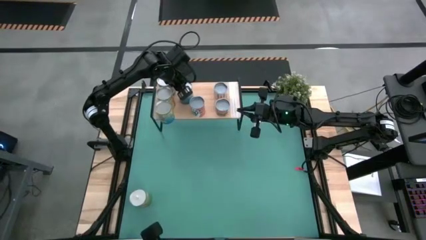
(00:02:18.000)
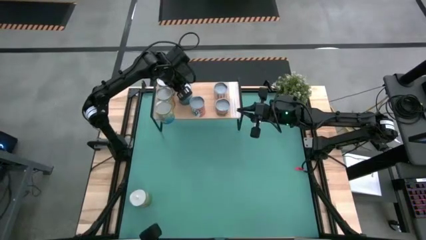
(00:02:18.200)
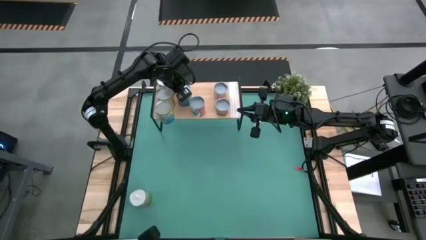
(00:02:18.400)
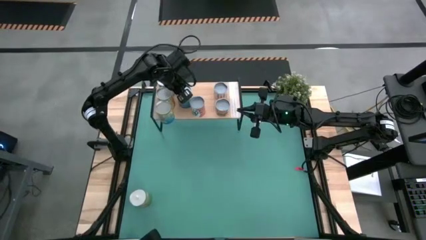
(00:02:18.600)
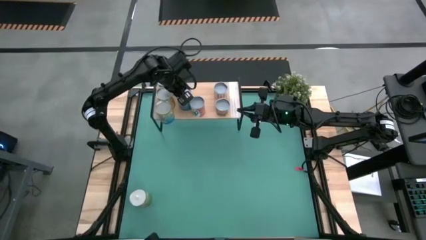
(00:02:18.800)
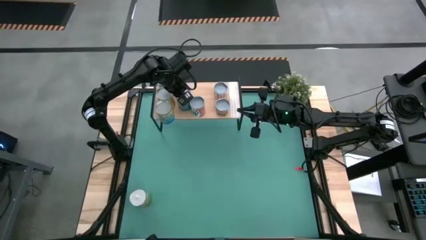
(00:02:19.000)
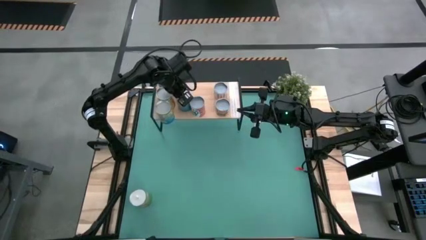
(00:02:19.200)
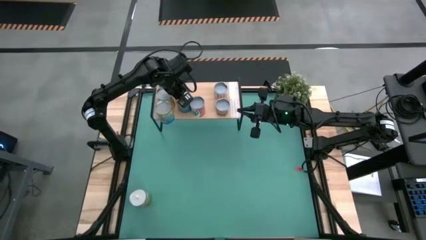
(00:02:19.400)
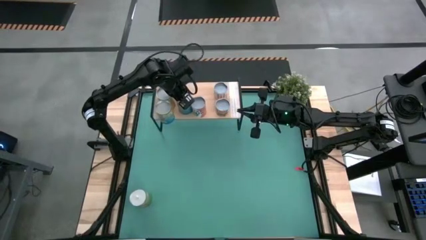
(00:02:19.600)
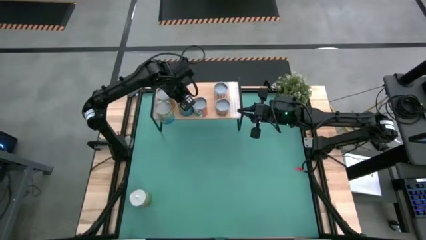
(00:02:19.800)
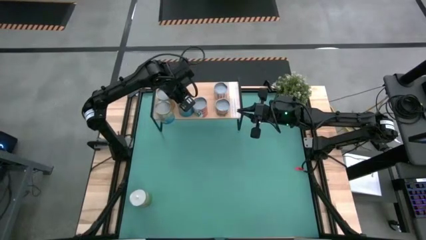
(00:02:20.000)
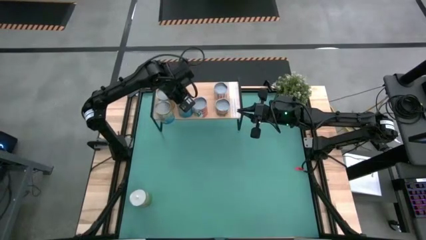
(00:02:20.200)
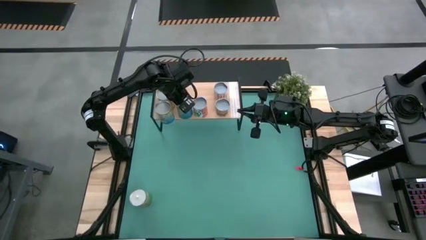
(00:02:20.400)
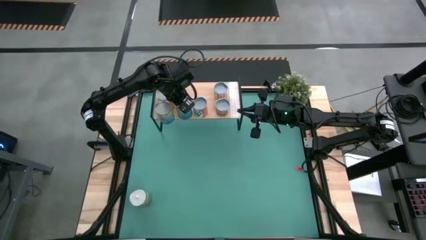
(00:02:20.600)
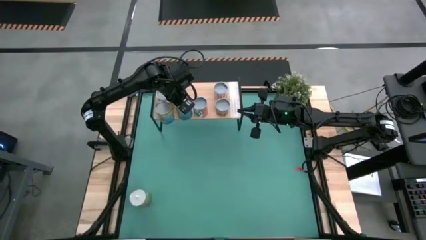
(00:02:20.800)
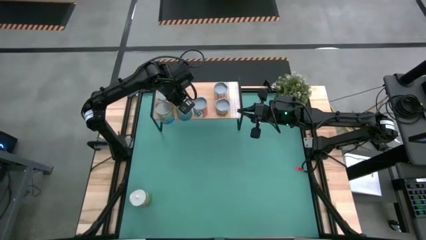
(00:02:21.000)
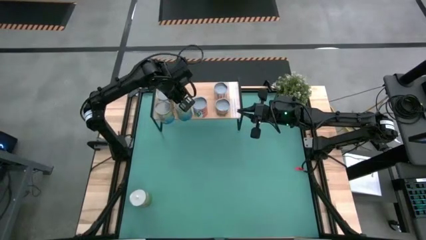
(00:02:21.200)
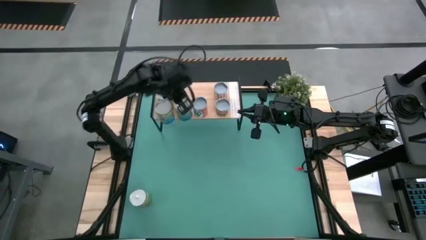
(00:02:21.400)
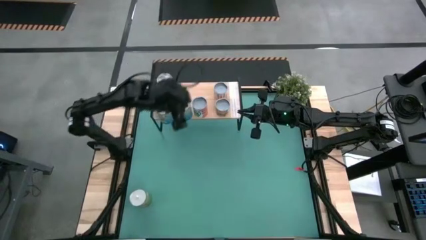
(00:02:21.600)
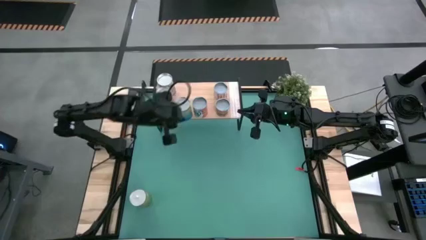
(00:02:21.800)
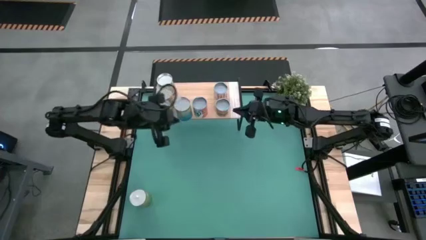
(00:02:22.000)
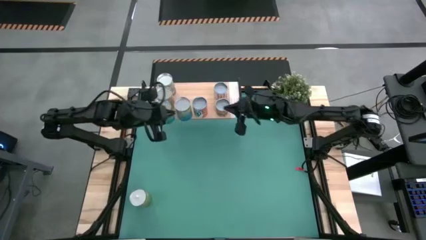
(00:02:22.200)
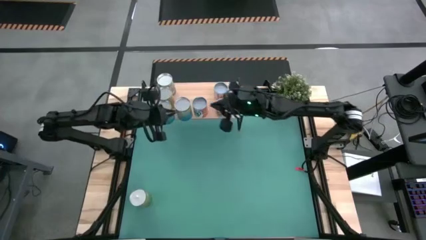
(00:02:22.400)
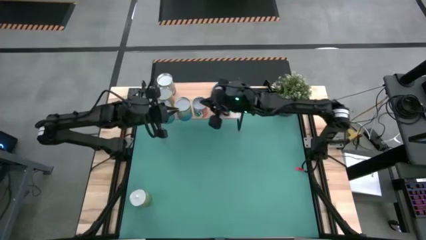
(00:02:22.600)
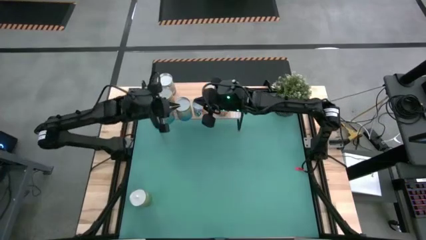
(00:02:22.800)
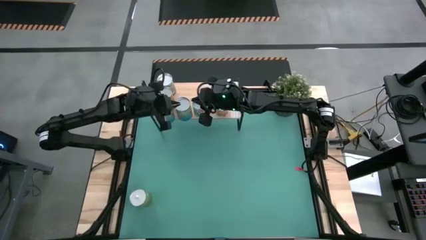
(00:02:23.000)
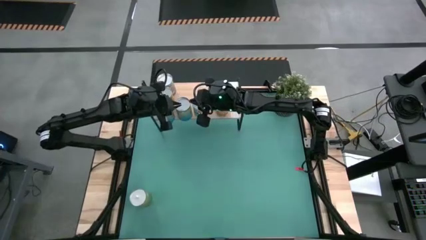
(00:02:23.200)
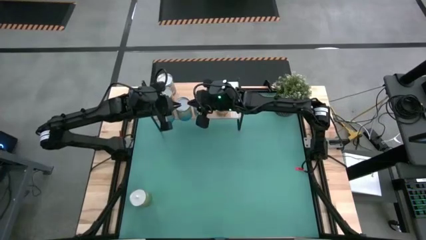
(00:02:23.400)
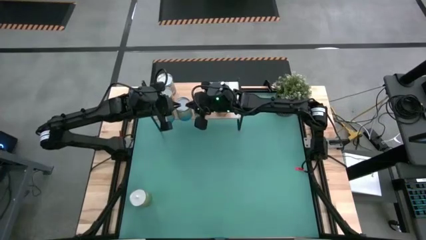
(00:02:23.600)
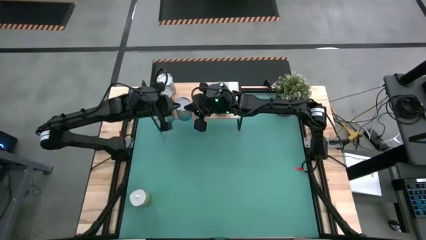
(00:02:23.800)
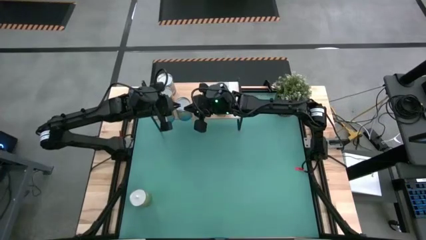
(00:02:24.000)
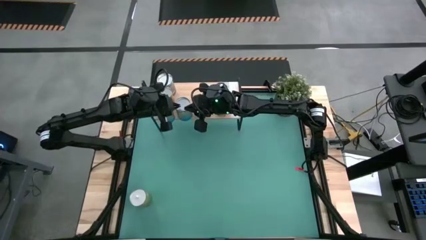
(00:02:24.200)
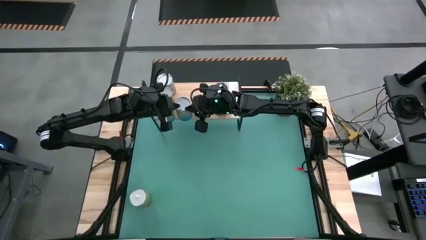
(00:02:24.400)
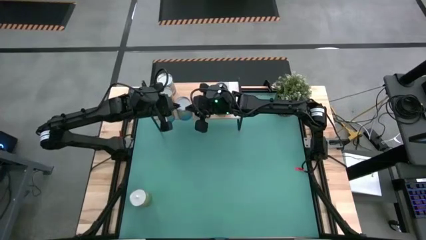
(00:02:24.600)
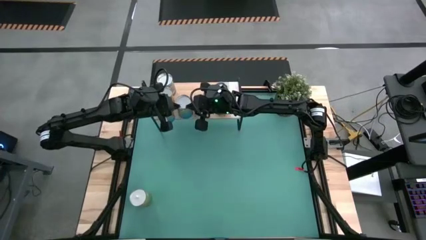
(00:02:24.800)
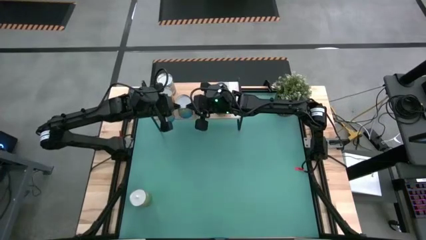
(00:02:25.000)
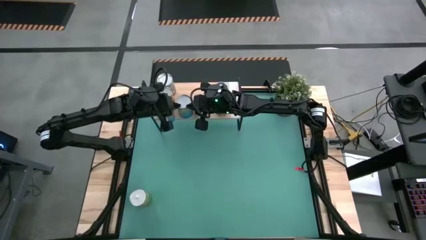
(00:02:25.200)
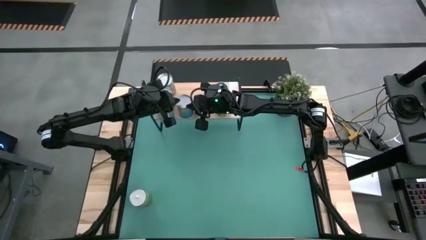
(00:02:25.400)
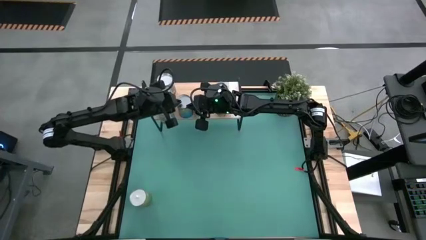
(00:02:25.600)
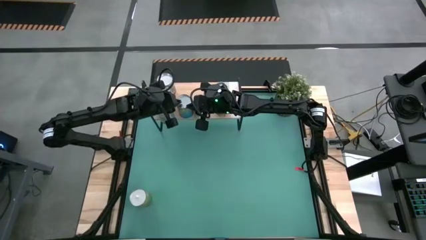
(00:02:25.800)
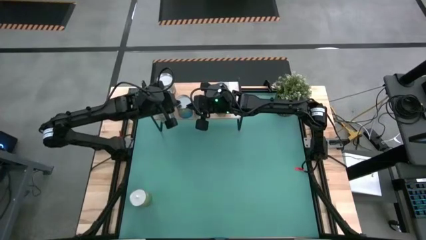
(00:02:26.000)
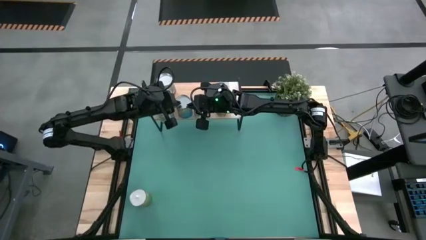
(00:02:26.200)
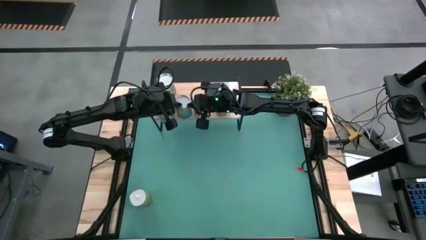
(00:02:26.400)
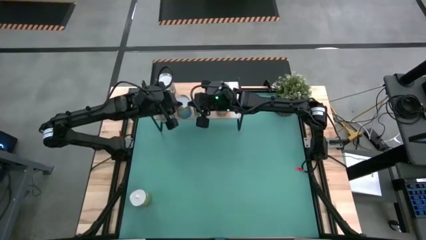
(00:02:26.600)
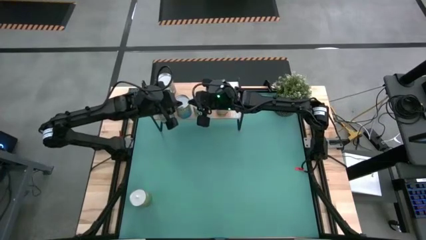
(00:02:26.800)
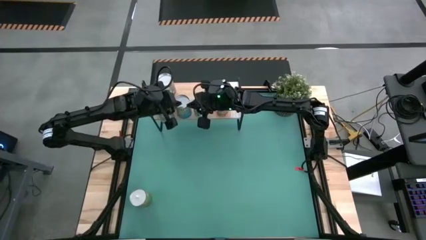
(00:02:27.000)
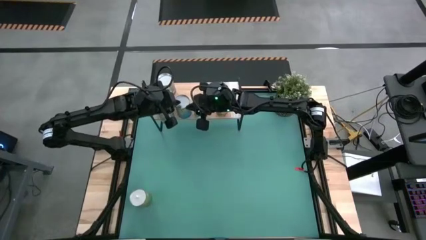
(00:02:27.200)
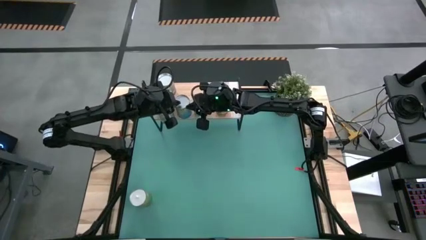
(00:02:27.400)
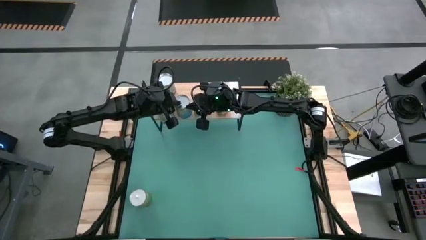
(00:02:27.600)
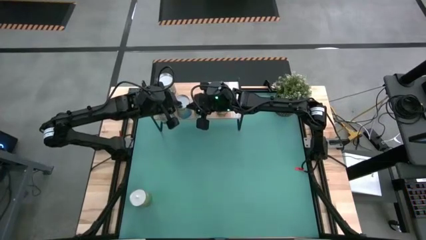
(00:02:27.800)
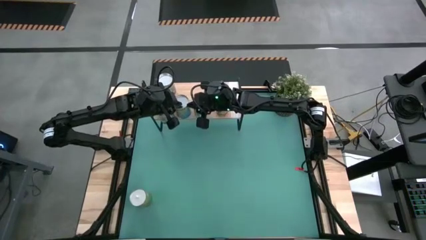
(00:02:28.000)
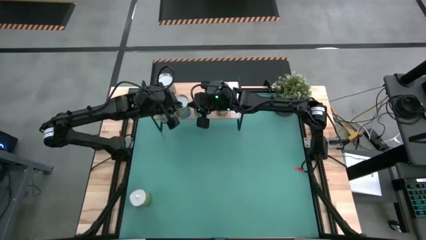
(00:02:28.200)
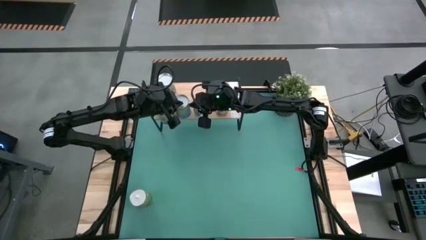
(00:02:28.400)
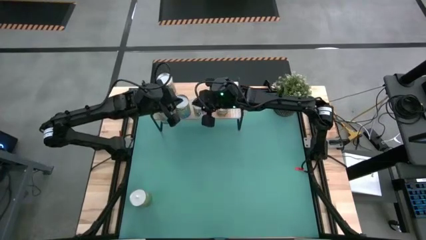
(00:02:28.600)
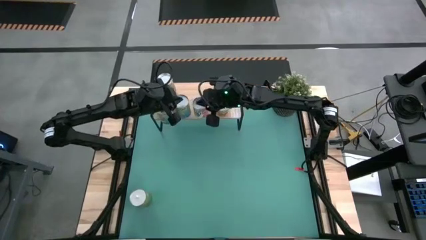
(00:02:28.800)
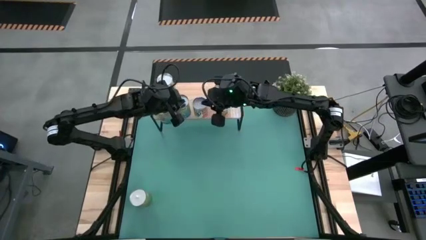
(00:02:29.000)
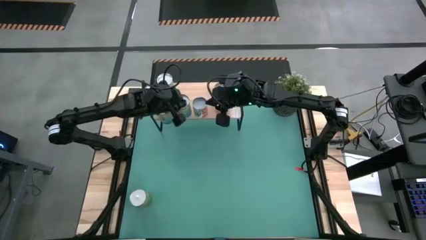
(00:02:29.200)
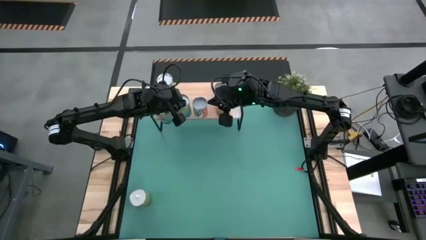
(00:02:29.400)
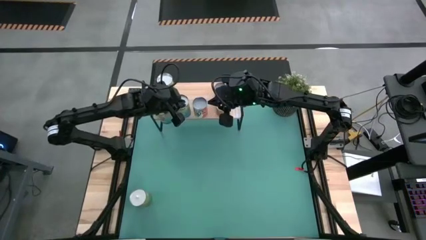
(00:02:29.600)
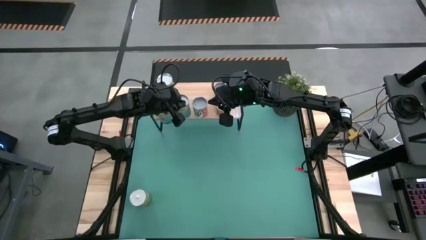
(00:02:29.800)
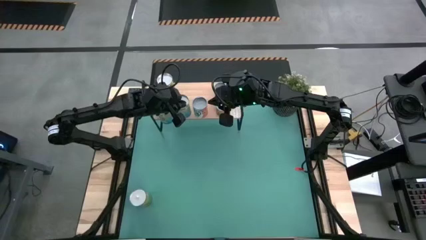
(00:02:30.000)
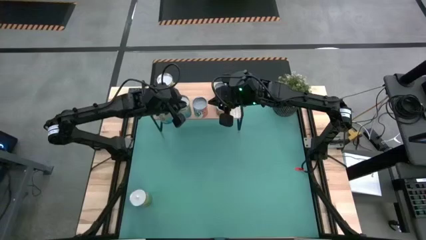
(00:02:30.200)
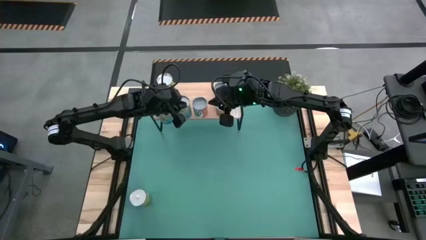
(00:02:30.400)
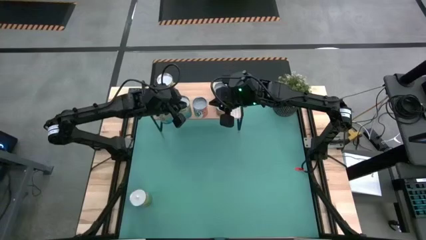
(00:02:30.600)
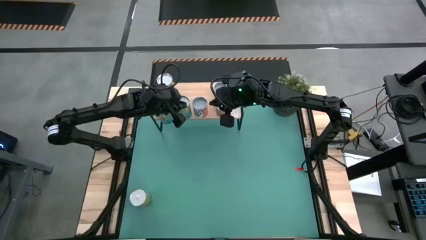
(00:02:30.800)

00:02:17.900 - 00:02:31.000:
Task: Pick and place cans onto a shelf
Put the canned cherries on the shelf
